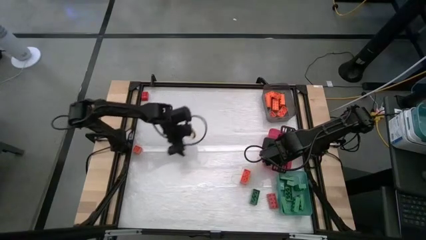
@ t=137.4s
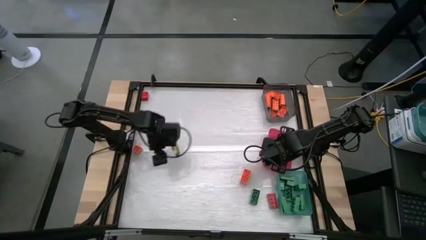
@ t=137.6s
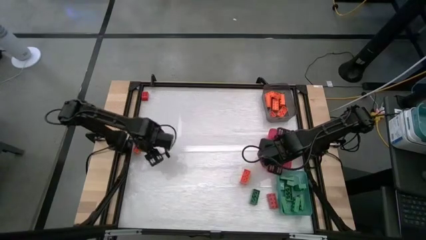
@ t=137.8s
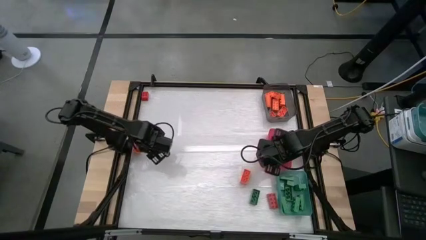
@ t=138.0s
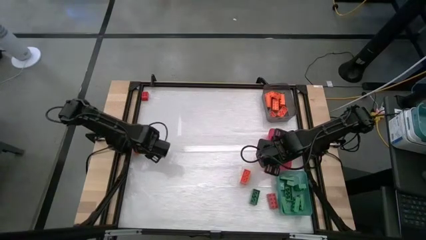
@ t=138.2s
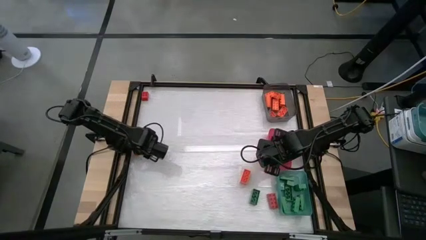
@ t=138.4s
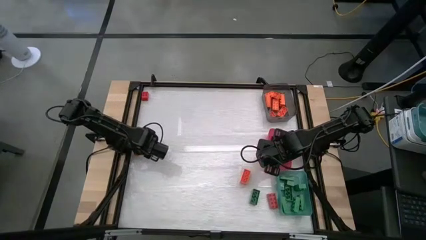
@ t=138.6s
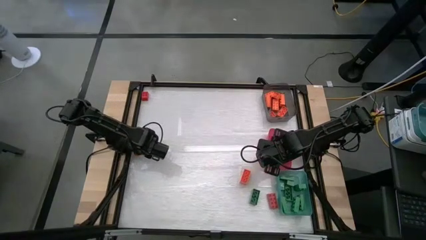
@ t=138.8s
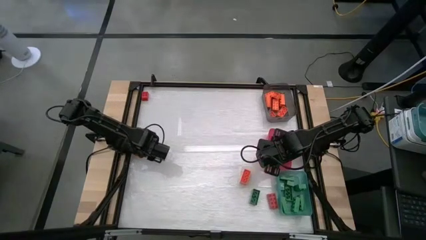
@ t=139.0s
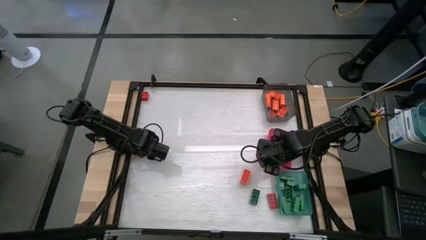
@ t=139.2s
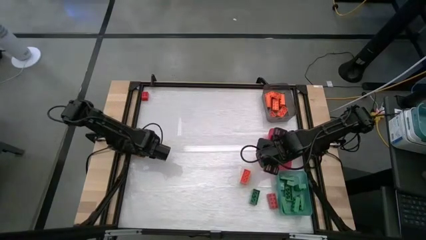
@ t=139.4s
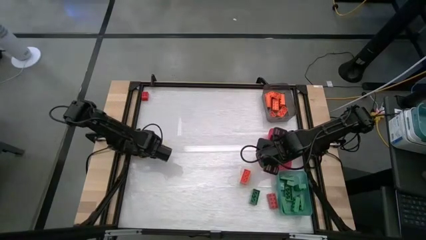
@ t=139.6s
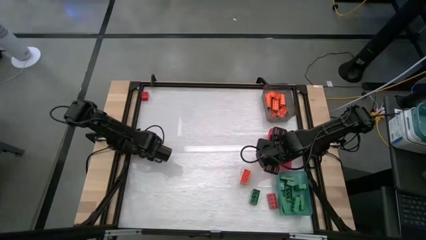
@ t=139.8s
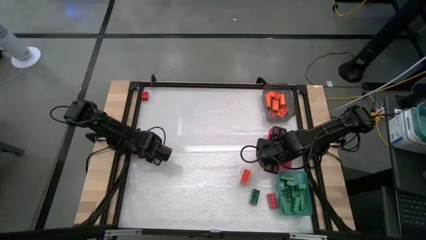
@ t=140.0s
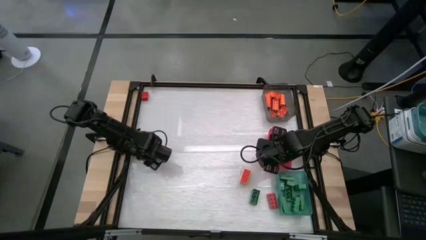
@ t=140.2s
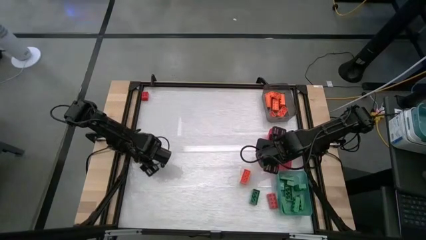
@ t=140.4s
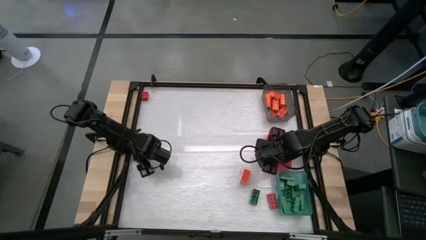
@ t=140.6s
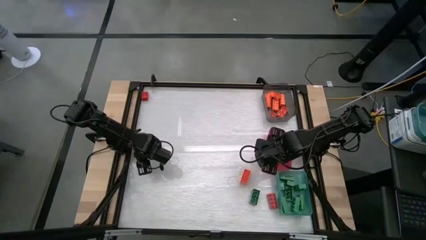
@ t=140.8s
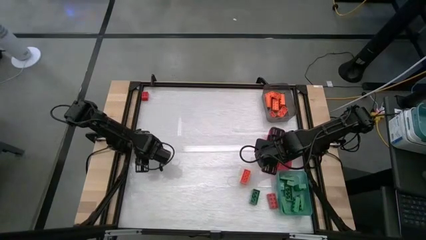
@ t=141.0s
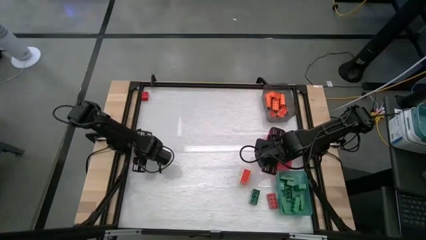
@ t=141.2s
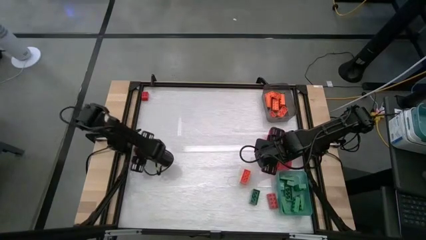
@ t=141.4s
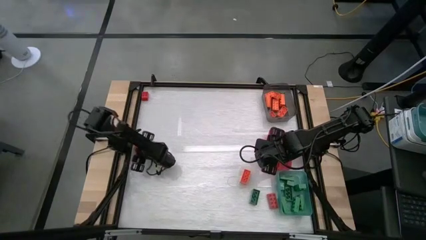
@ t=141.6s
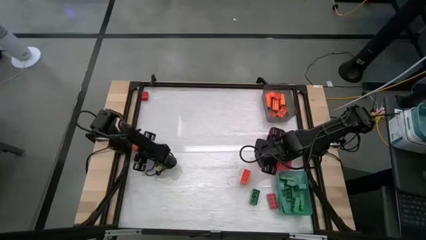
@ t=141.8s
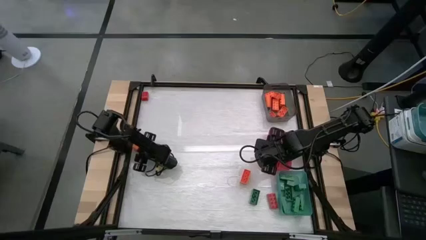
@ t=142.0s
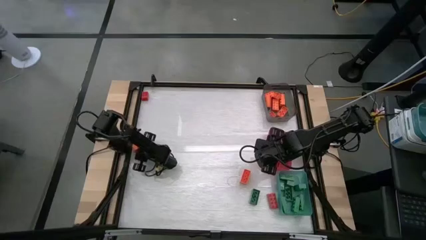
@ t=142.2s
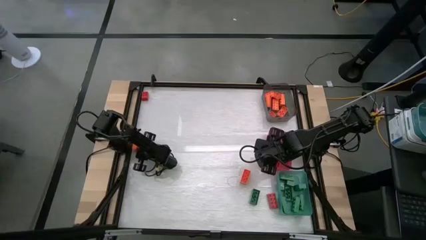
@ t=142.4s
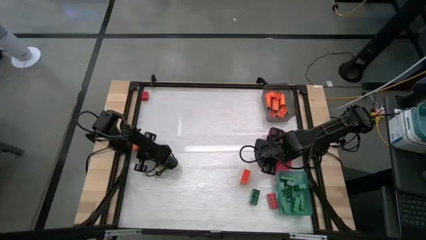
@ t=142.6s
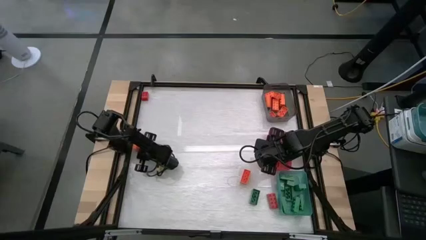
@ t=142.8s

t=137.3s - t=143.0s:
Task: Sort blocks
Put the orange game piece into the black bin

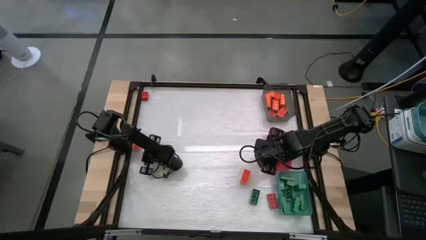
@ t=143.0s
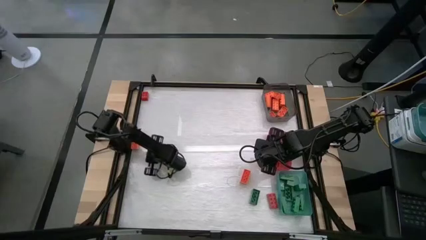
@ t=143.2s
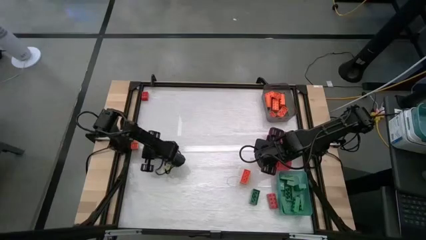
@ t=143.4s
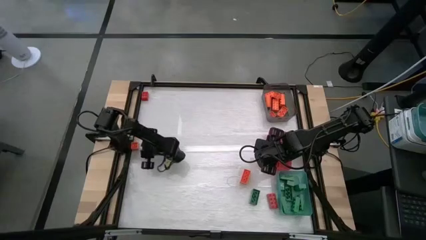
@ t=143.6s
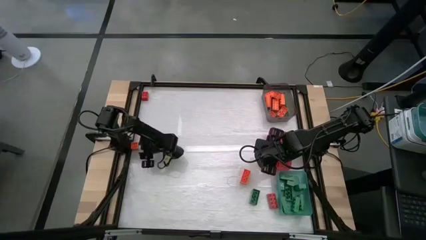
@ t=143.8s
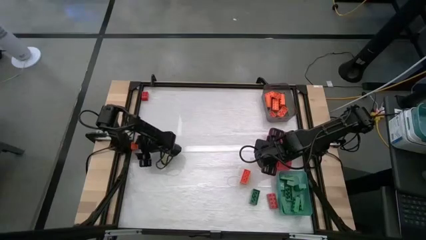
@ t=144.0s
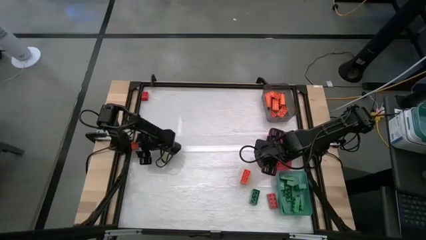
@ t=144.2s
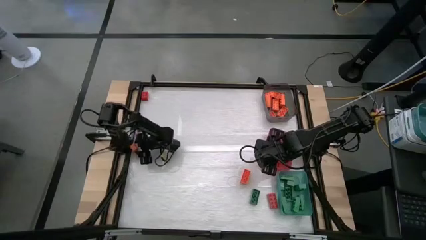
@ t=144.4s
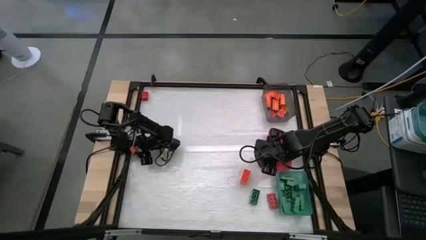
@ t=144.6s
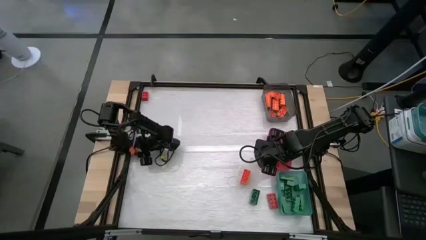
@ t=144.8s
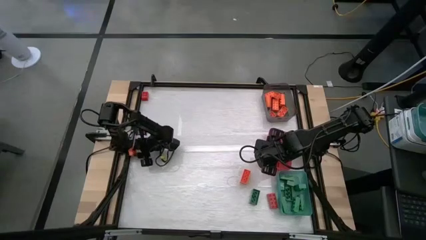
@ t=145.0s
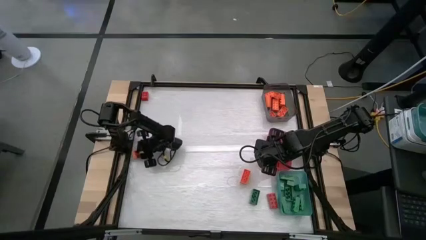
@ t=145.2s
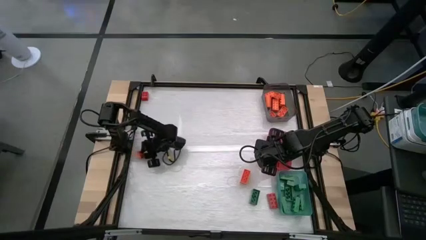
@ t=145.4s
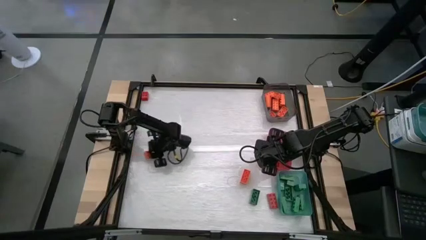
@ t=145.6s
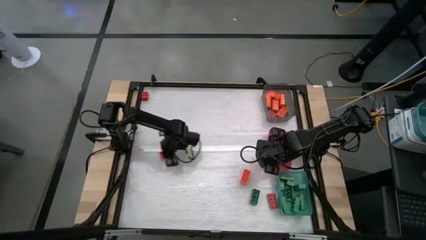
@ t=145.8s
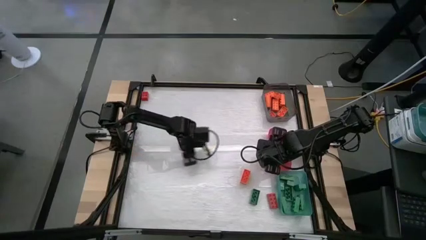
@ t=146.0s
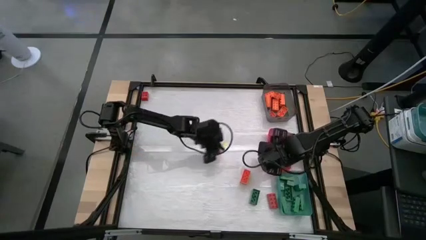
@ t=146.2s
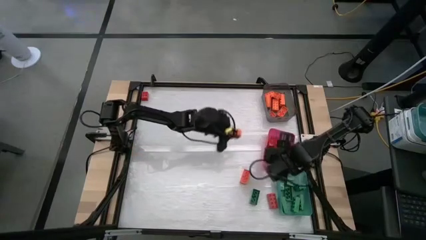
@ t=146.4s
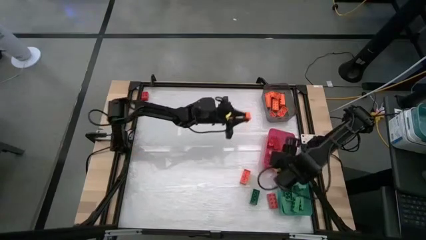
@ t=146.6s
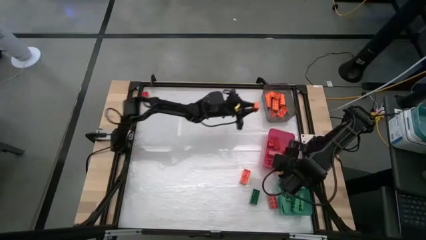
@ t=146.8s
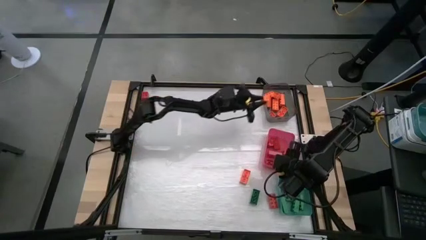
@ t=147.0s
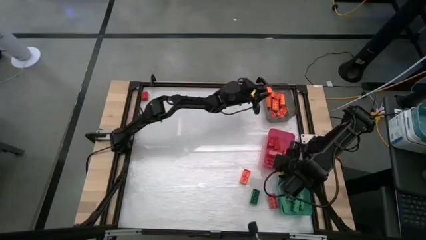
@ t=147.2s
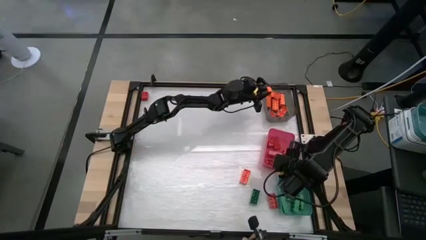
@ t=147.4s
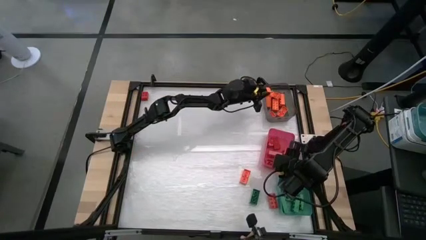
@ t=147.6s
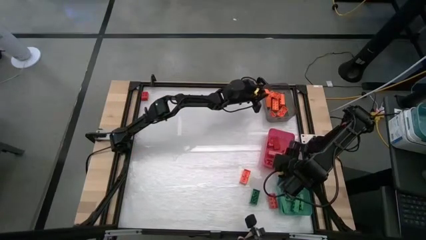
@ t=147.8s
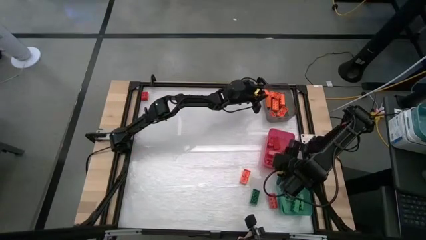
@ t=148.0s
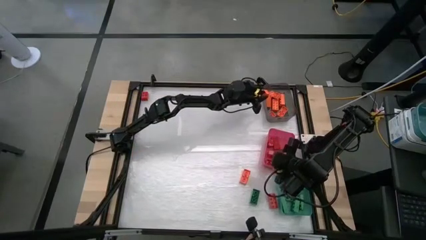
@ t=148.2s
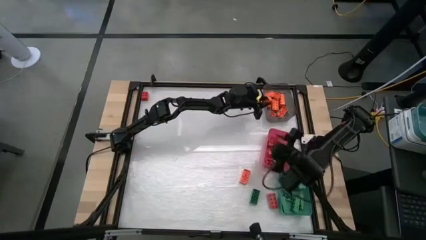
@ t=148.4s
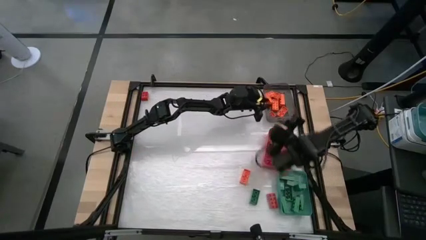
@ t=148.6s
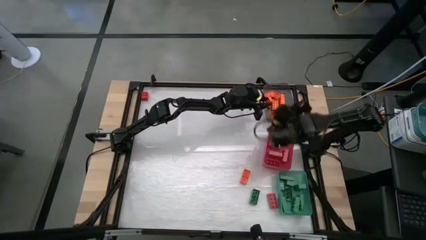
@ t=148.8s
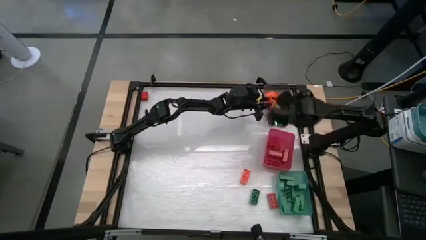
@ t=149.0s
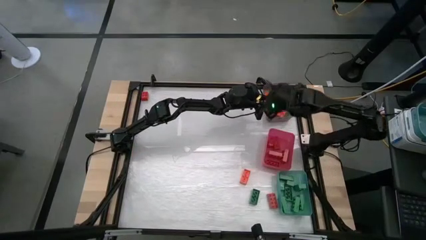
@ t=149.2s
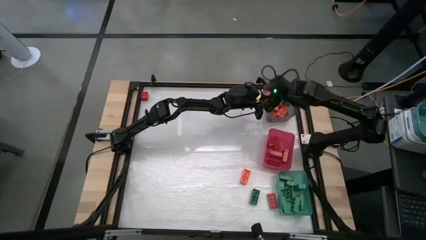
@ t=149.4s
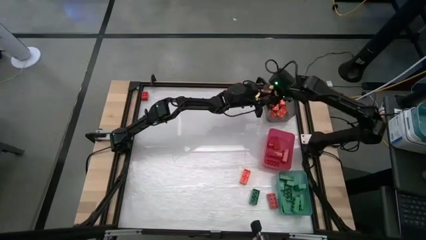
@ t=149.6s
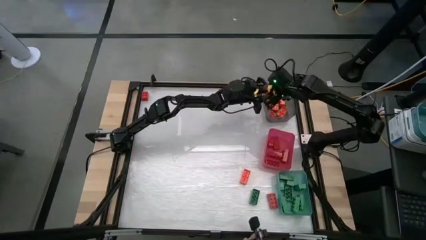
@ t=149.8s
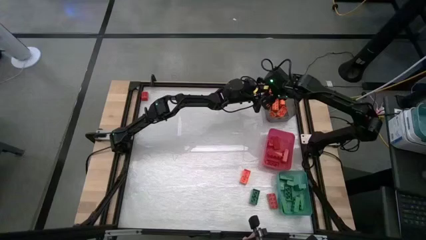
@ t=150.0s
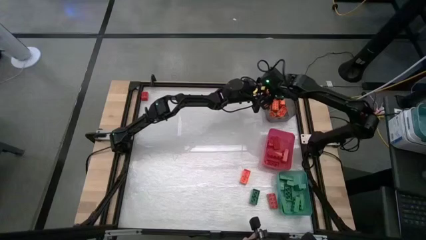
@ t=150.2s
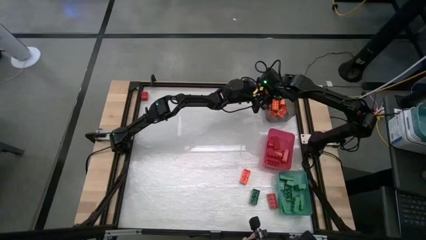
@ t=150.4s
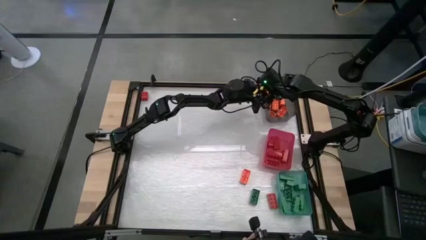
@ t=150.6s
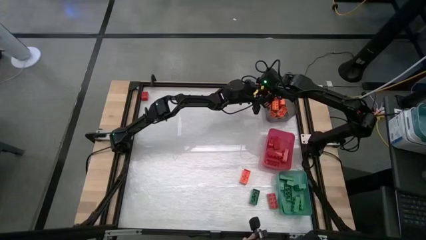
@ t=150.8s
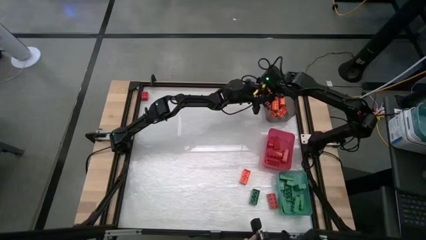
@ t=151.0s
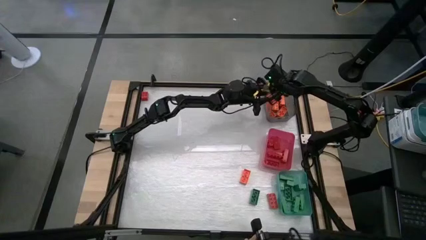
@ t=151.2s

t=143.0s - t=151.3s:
Put the orange game piece into the black bin

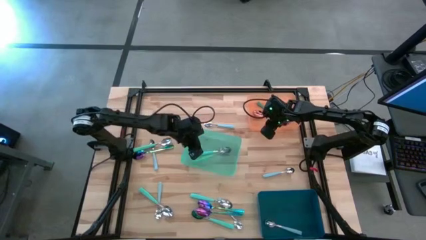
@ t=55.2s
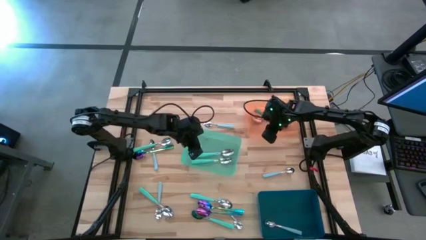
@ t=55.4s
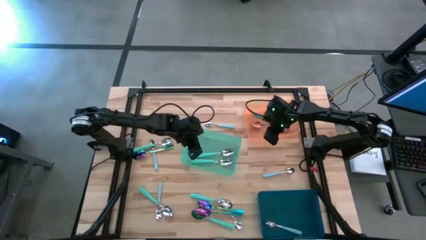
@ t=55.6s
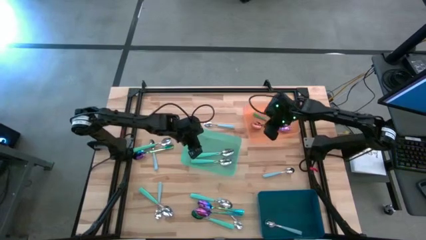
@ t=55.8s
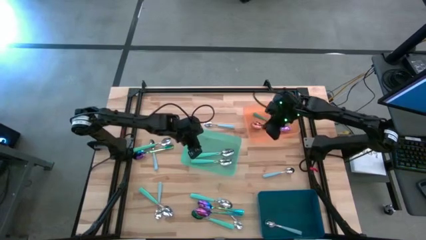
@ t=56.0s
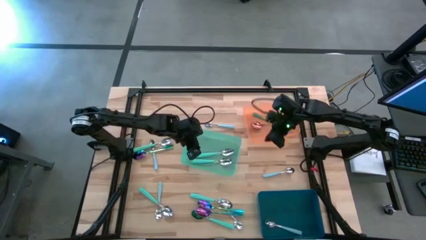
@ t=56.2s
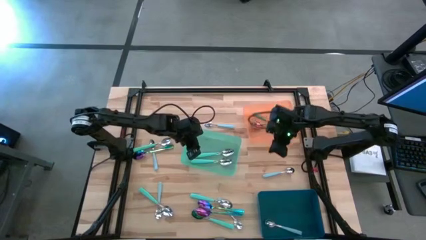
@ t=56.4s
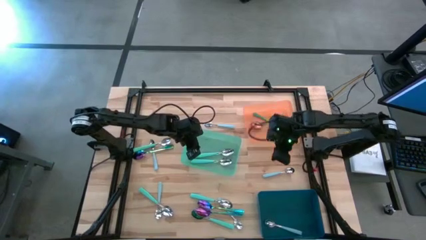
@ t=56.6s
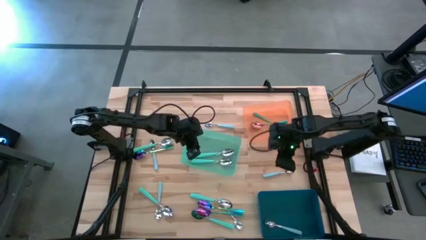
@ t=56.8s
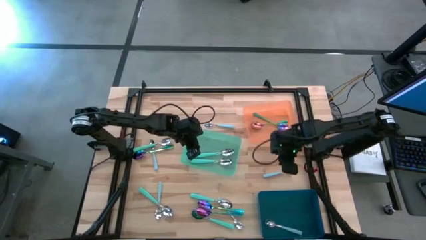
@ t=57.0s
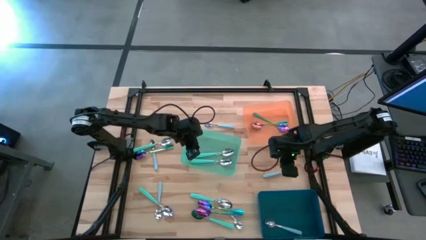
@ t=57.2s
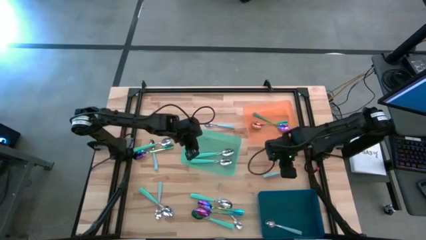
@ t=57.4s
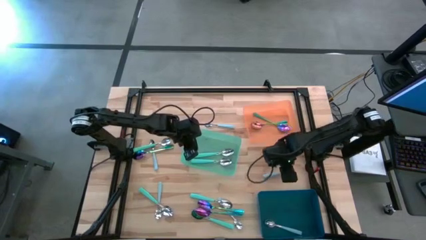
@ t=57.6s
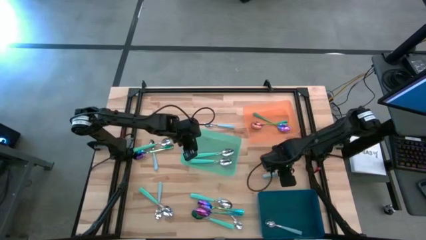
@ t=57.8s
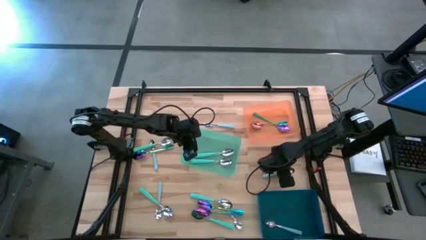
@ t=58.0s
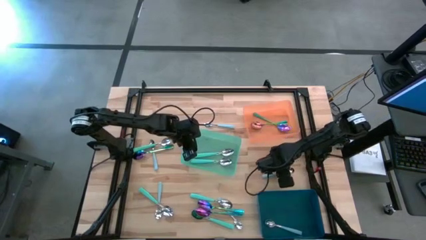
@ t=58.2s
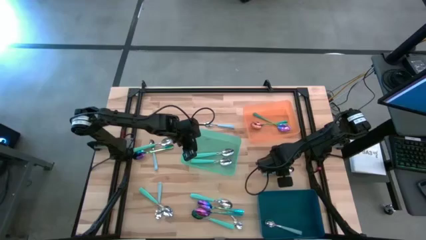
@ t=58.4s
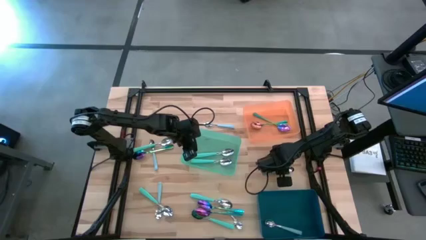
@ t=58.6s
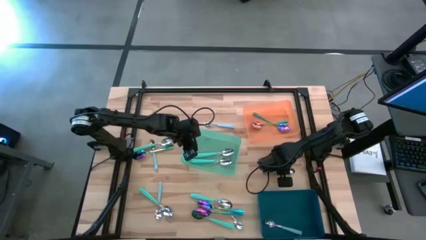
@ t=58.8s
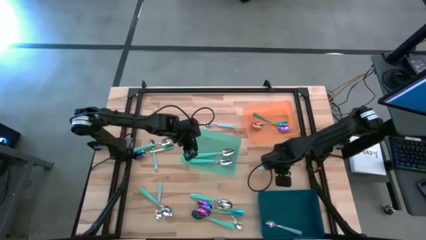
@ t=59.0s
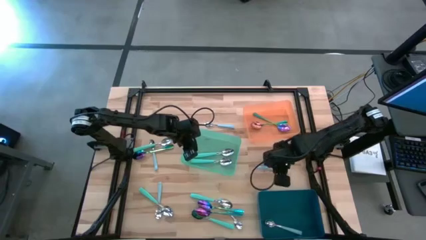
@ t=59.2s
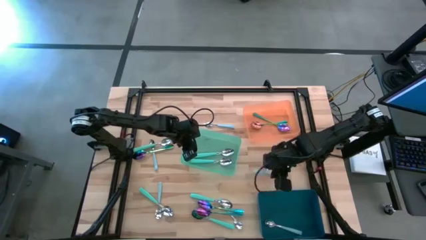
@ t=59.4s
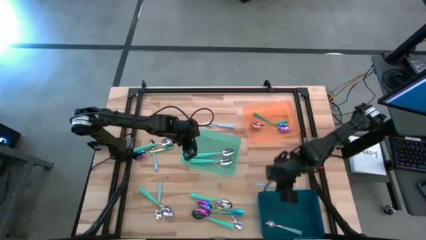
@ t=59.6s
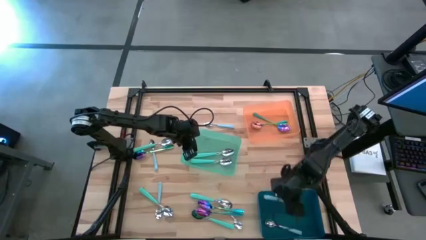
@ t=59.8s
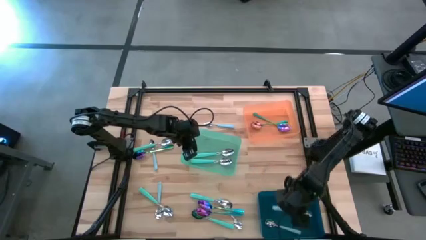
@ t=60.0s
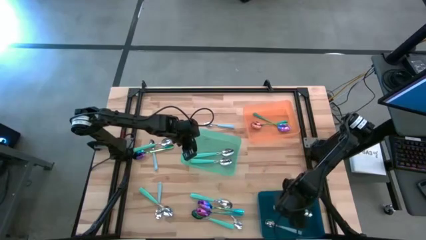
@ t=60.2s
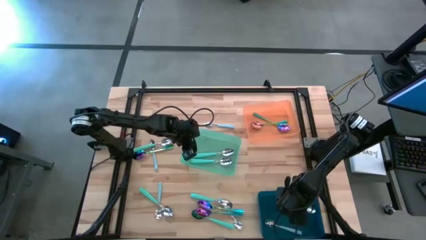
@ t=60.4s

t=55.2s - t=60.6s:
Task: Sort silverware by color (type)
Put the blue spoon into the blue bin
